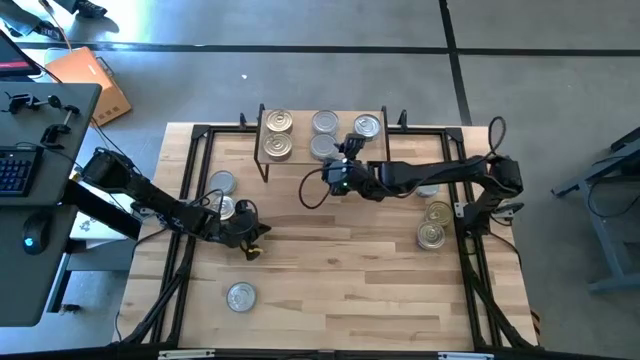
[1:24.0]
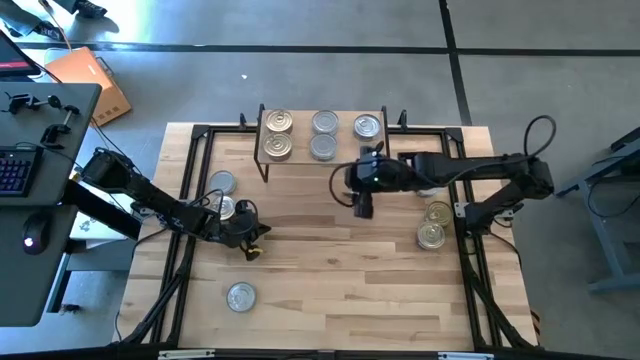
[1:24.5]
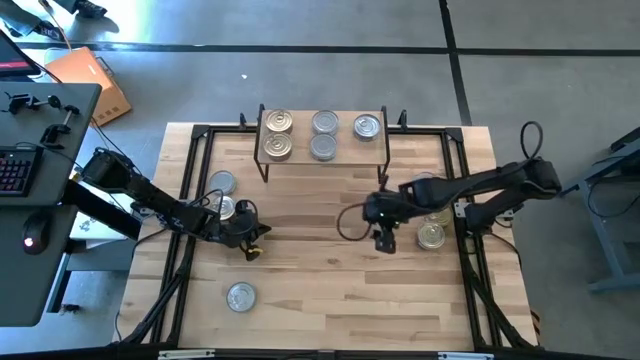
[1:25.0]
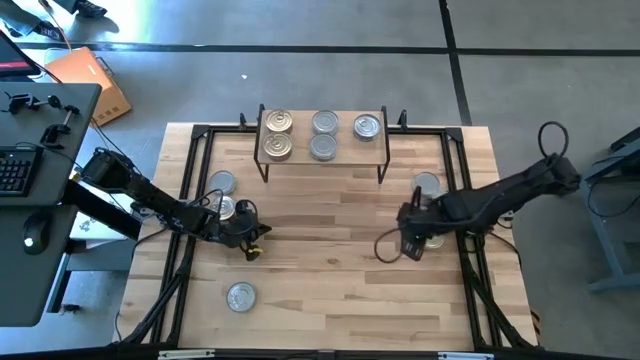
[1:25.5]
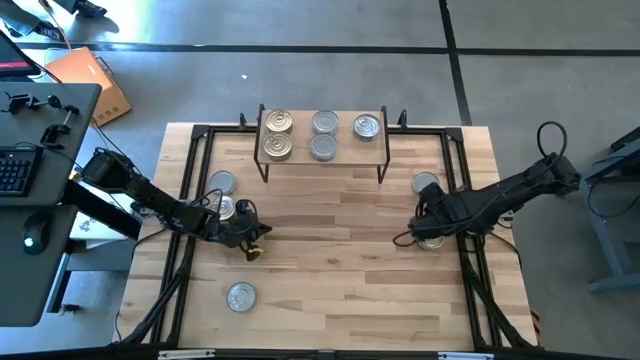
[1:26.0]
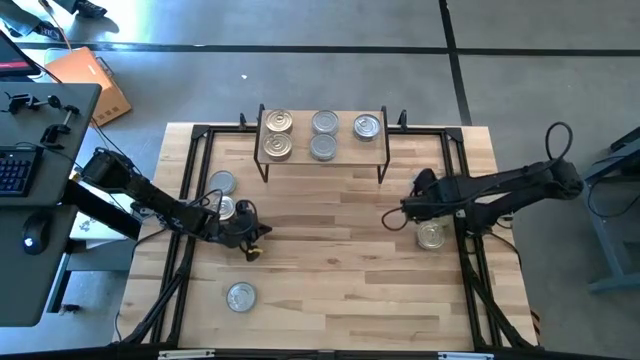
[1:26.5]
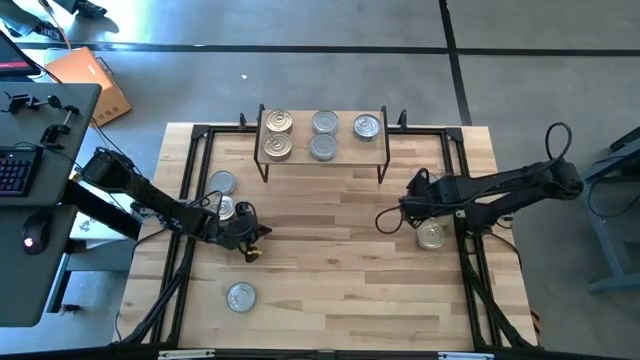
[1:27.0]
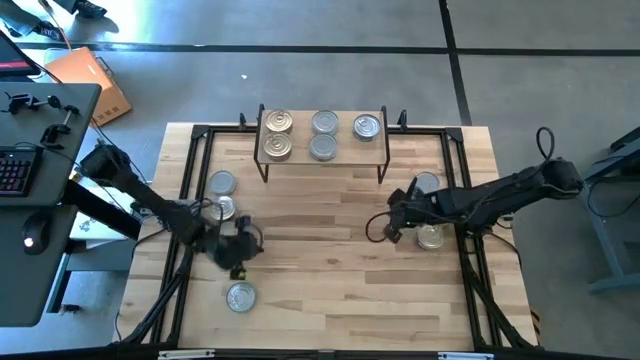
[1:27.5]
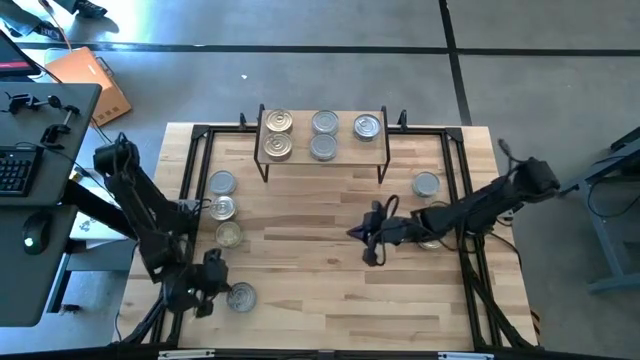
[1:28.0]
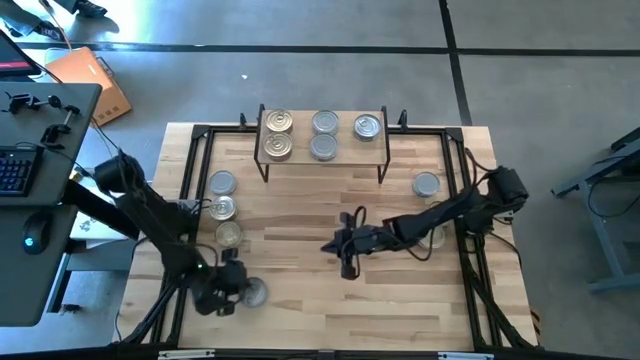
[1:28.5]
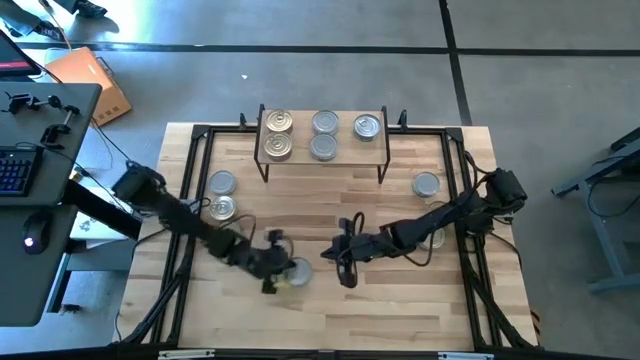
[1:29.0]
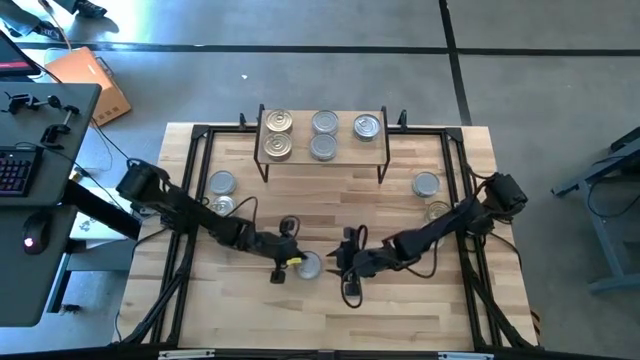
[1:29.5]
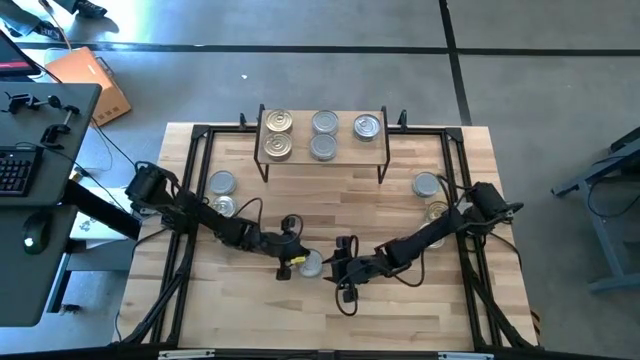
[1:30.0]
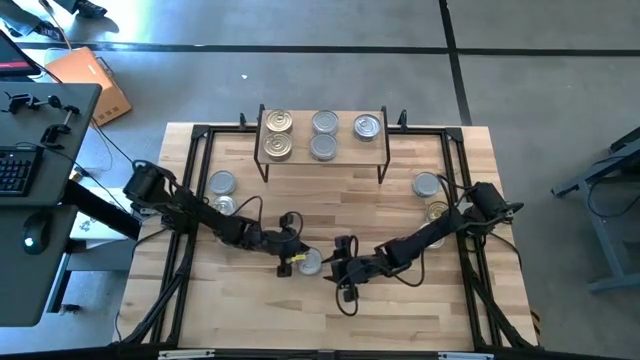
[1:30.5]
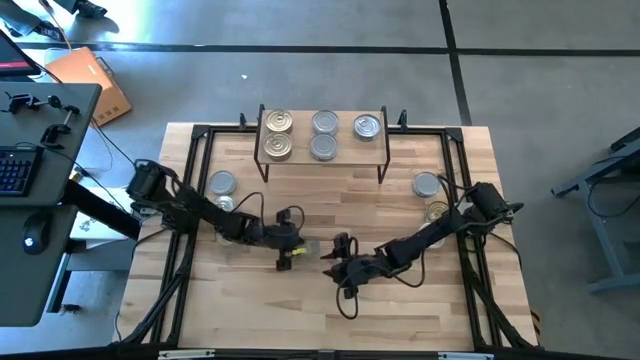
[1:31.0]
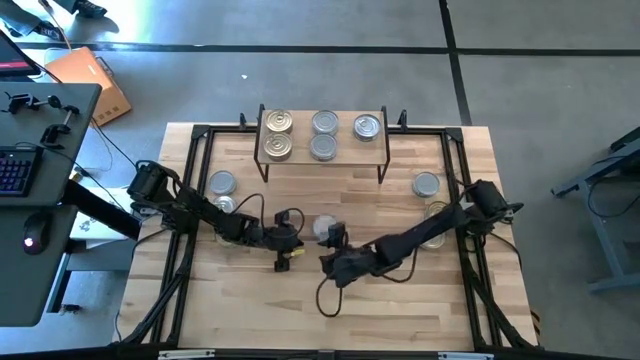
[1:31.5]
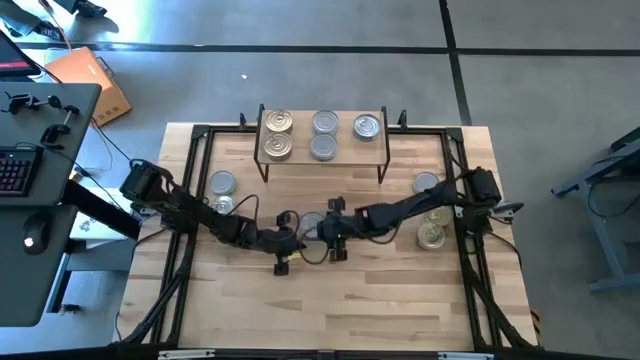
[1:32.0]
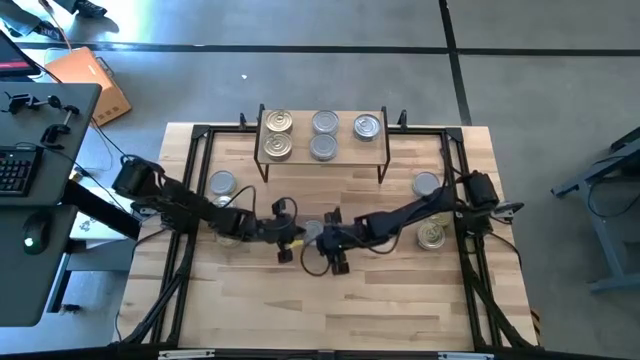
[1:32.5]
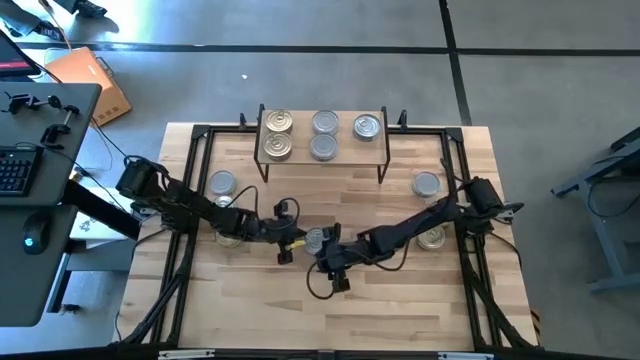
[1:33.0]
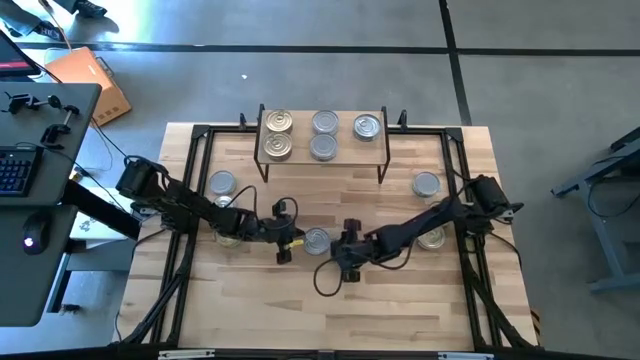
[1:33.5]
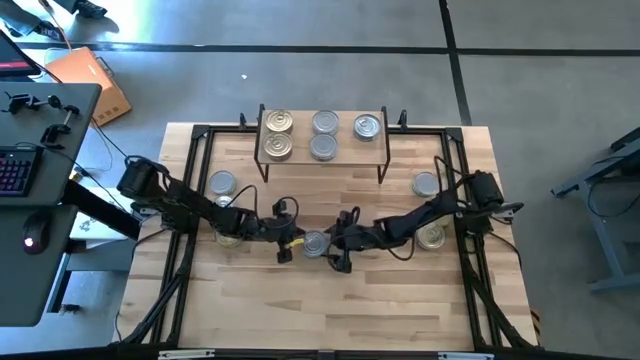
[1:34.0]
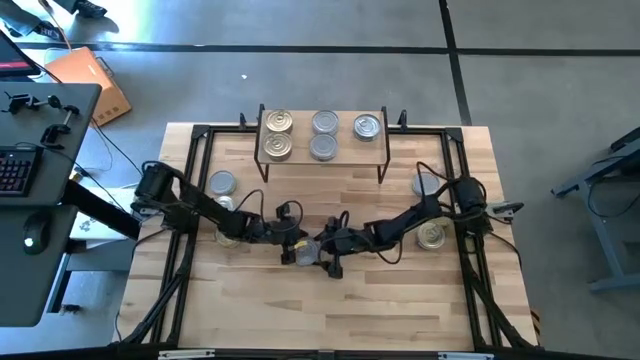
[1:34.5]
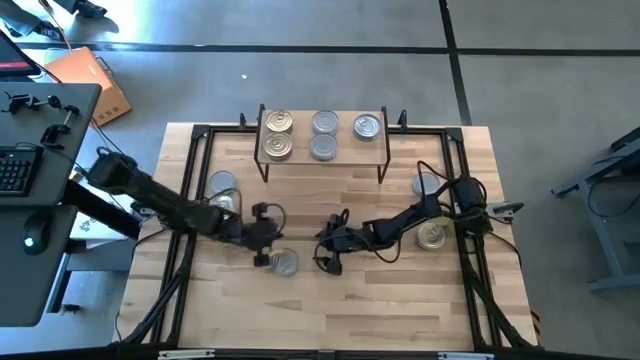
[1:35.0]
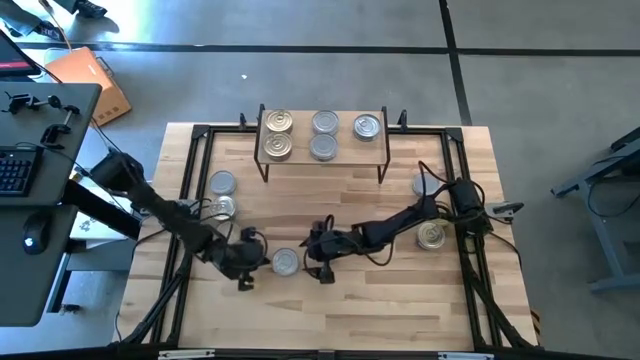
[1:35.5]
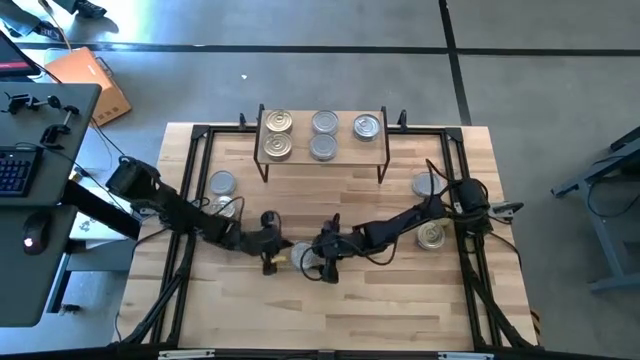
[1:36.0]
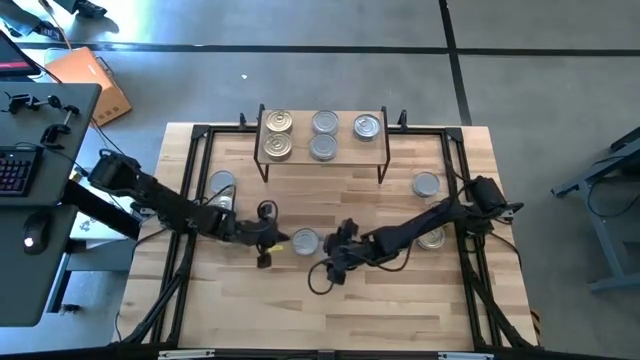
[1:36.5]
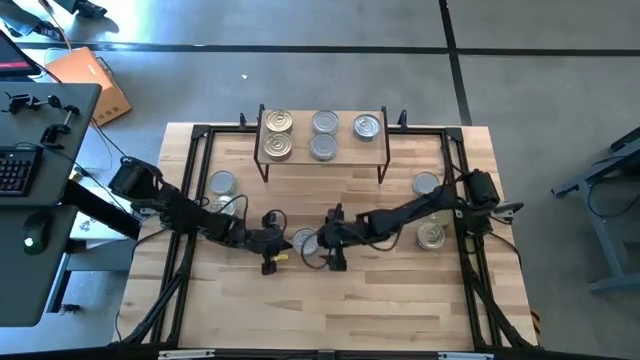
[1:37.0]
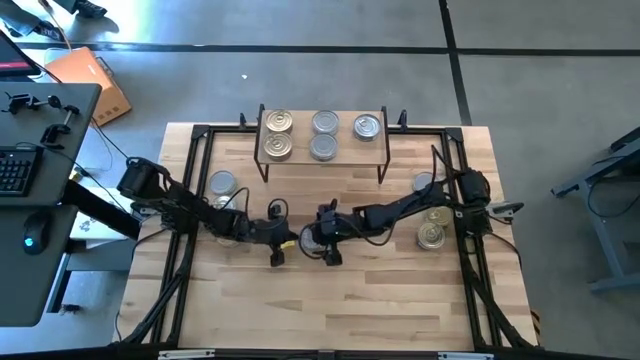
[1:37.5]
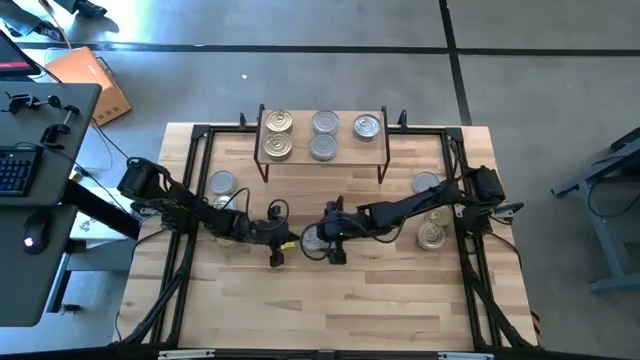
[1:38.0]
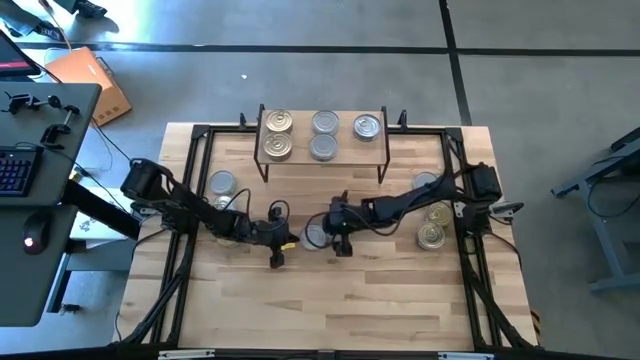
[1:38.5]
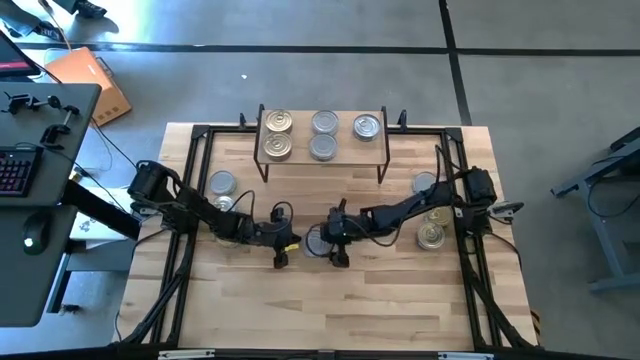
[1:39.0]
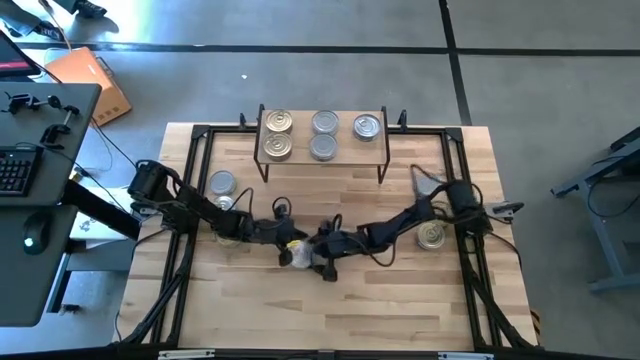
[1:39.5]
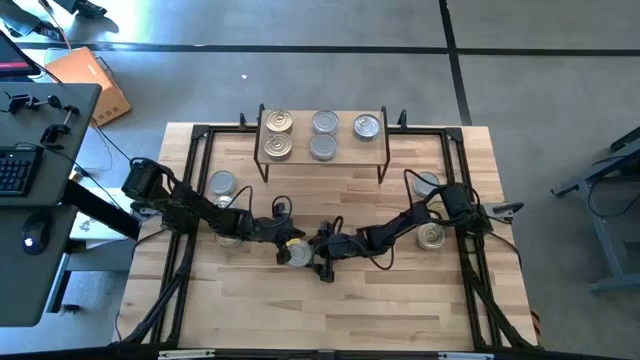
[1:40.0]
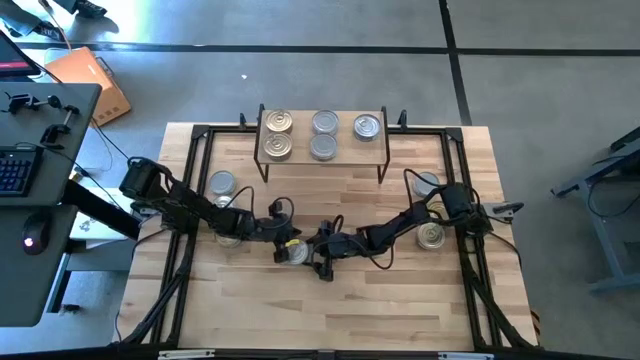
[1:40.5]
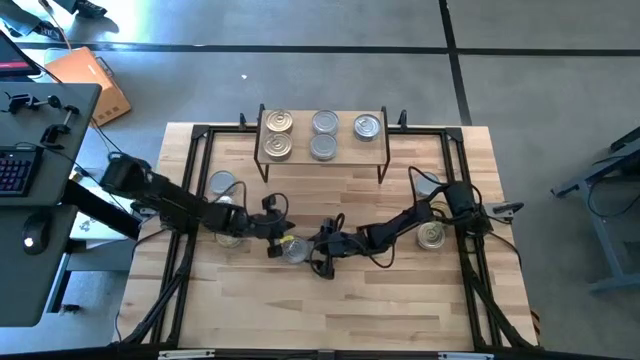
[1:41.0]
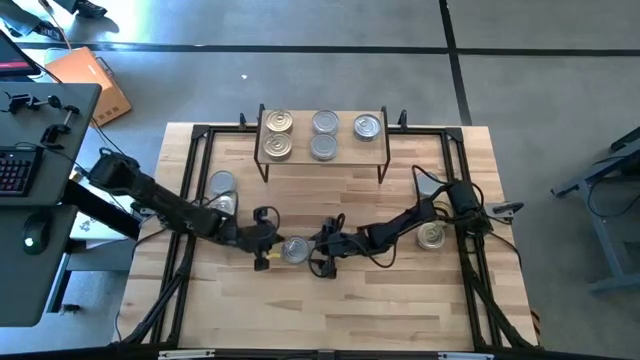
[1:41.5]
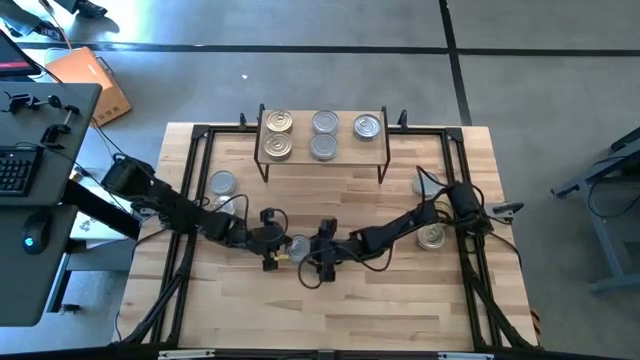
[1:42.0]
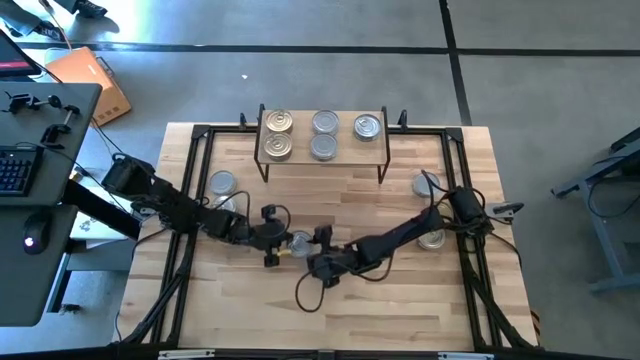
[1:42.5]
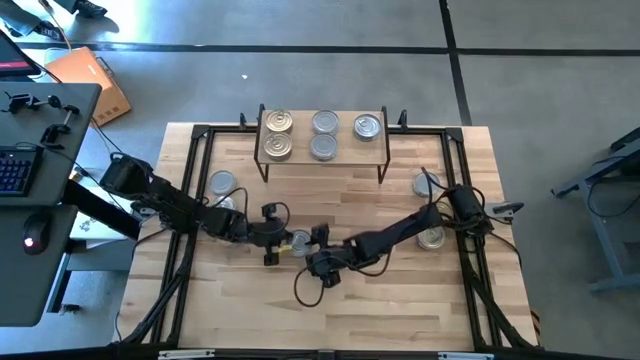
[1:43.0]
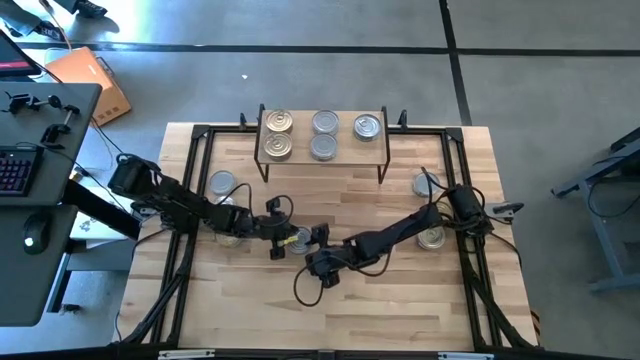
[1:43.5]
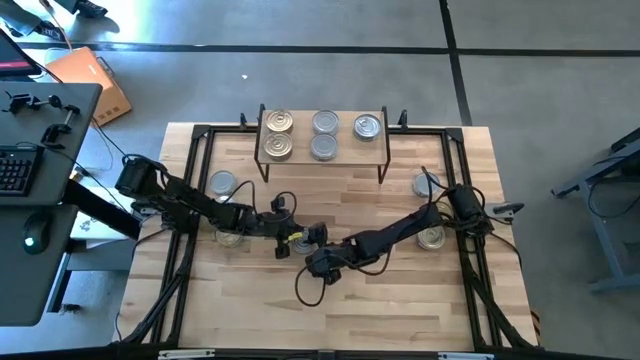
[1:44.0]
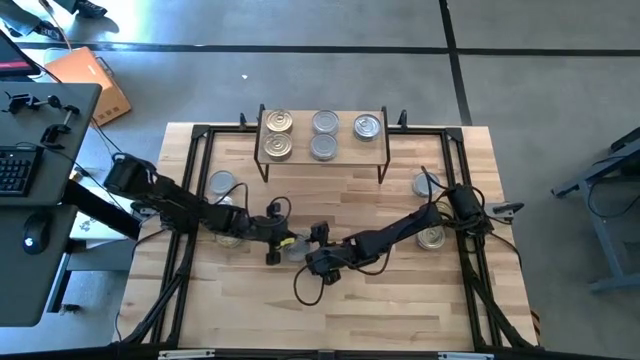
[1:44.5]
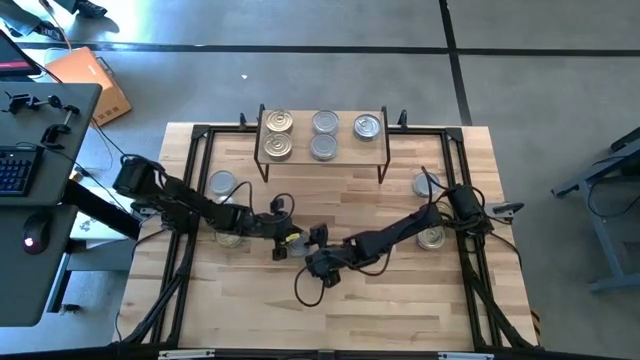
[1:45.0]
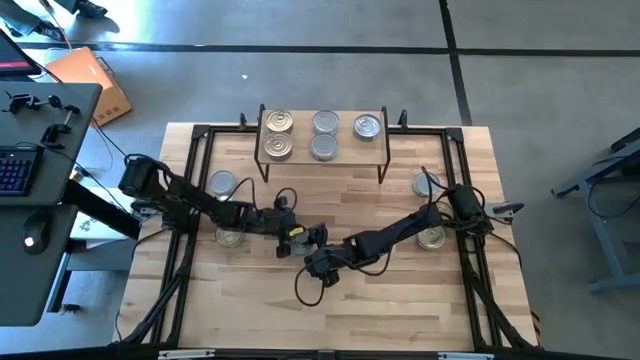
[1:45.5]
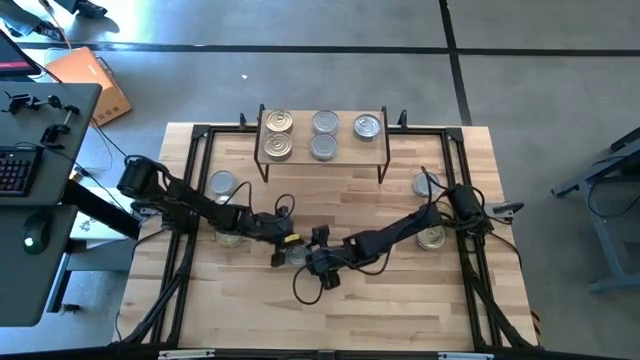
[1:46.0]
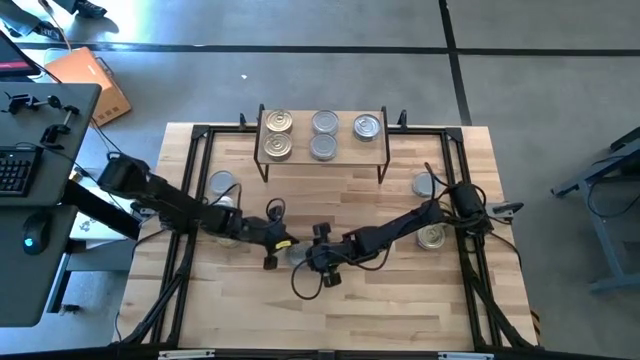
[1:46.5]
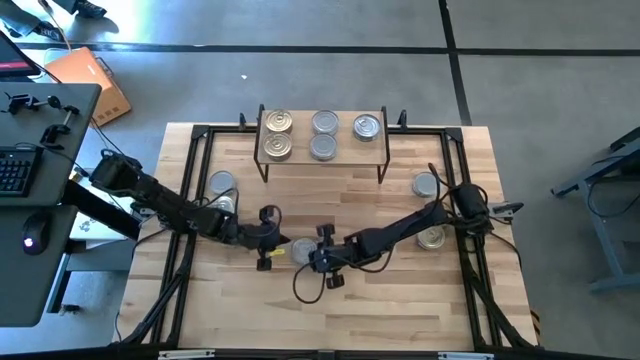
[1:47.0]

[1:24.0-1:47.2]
Task: Stack canned seafood by type on shelf
Put the bottom left green tuna can on the shelf aligned with the other green tuna can
